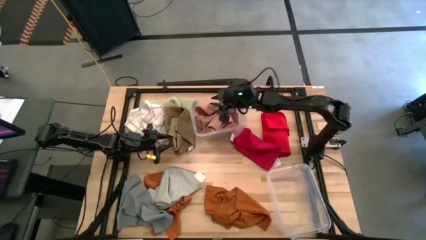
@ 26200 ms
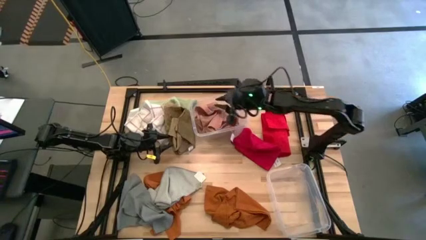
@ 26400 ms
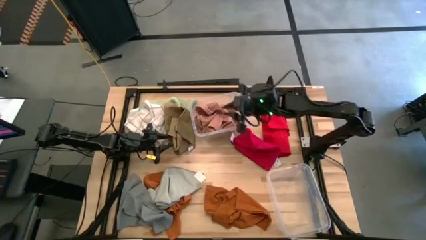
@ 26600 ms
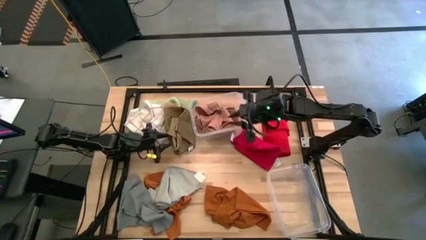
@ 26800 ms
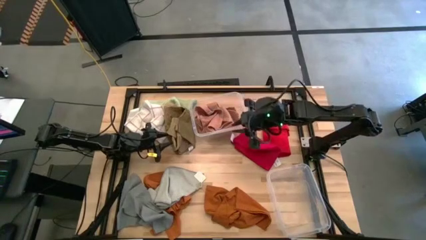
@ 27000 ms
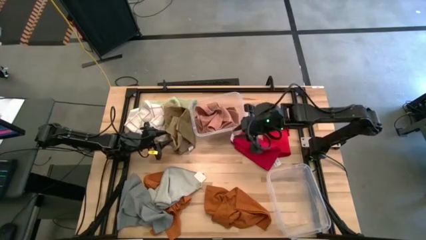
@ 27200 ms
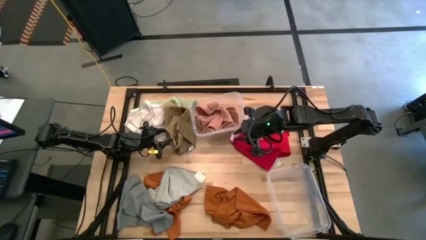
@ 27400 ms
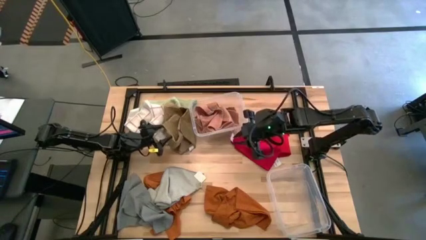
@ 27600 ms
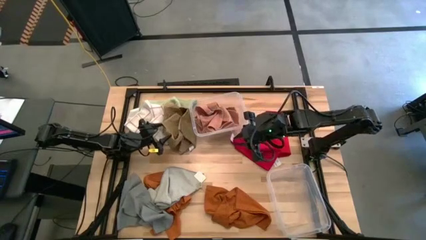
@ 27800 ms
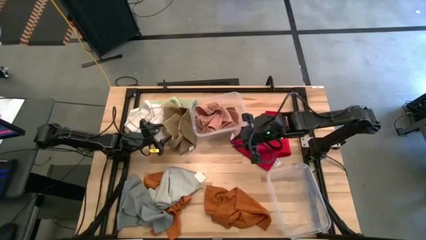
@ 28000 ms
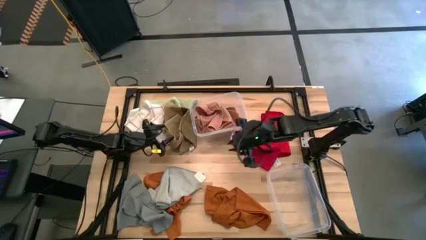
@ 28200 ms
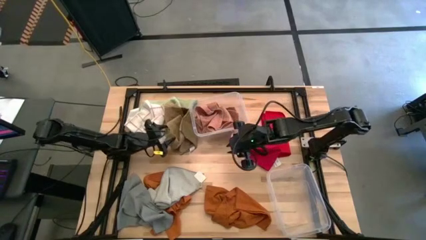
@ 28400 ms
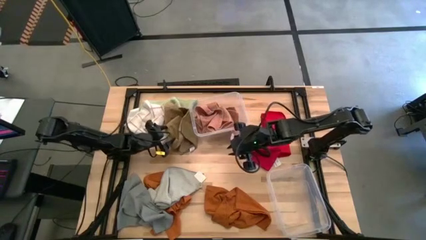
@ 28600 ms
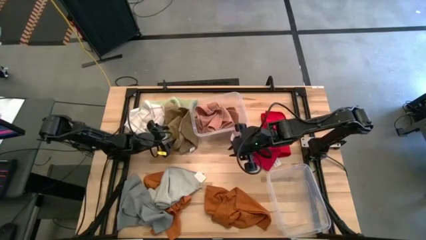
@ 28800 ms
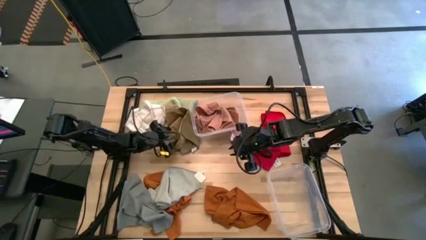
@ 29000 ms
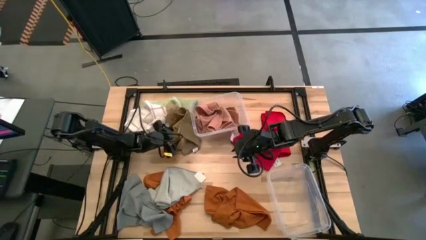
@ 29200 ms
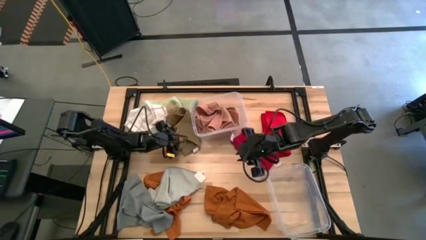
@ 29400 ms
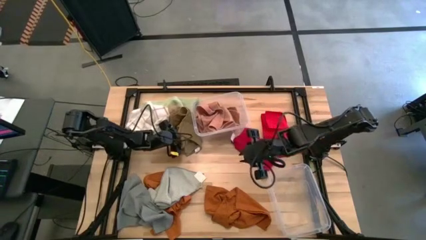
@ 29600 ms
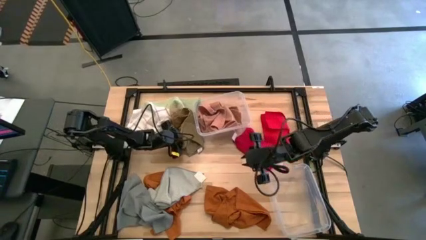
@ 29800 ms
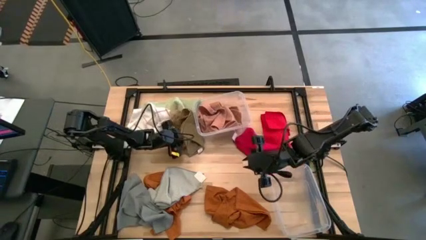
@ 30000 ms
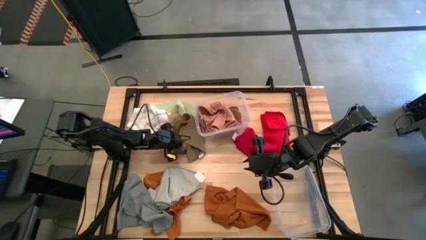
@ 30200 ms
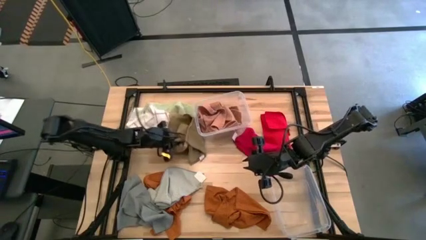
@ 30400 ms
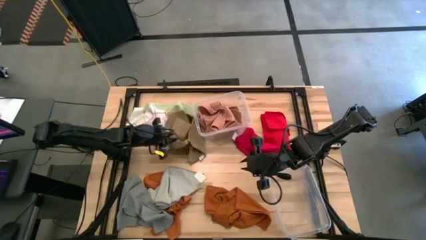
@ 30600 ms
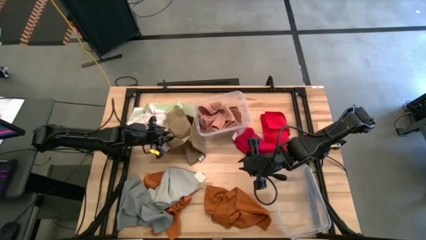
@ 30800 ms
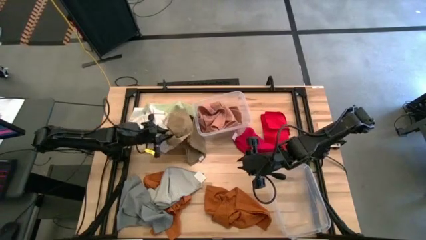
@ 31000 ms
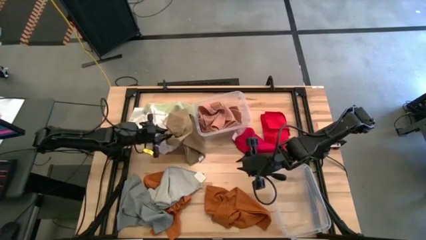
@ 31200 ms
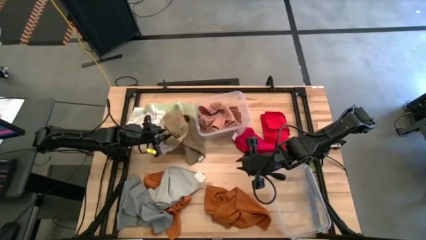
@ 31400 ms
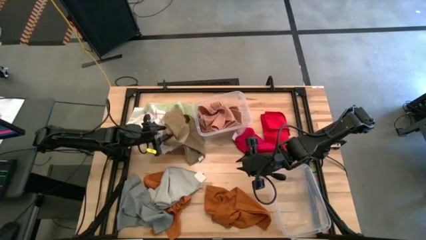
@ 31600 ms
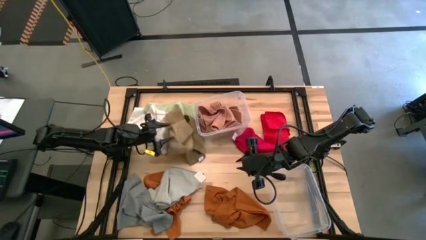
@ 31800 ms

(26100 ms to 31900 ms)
Task: Sort towels by color in basket
Put the left light brown towel into the top transparent bin

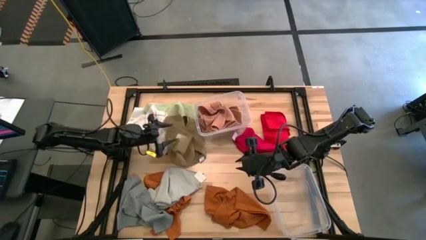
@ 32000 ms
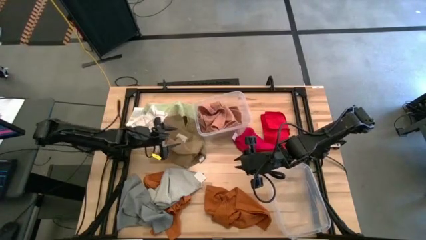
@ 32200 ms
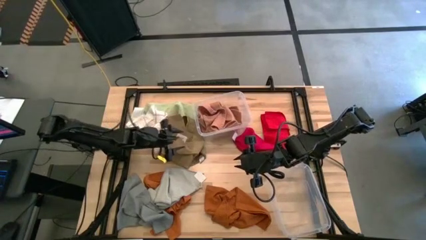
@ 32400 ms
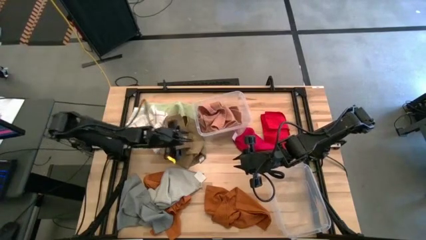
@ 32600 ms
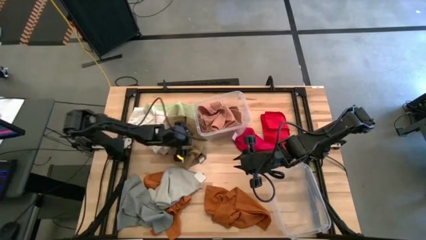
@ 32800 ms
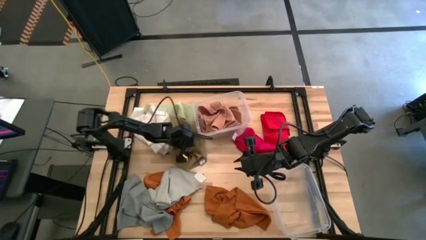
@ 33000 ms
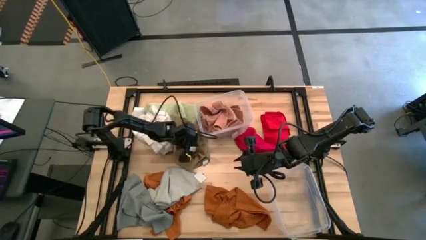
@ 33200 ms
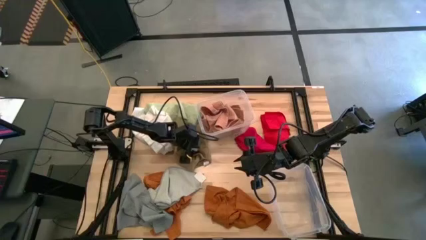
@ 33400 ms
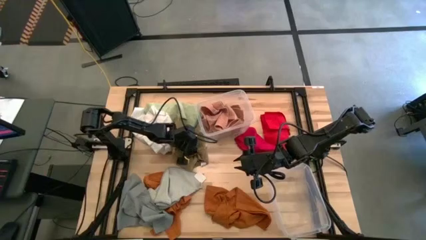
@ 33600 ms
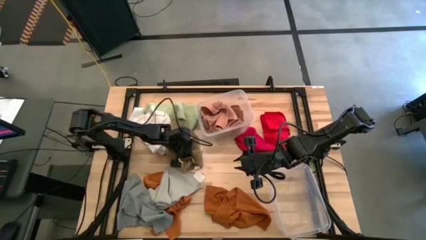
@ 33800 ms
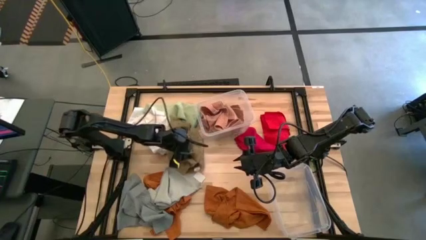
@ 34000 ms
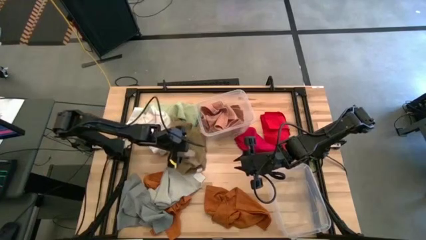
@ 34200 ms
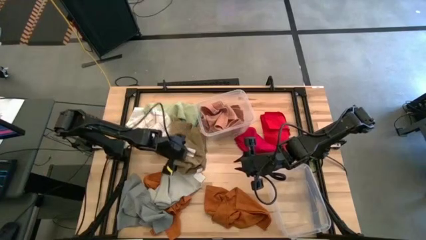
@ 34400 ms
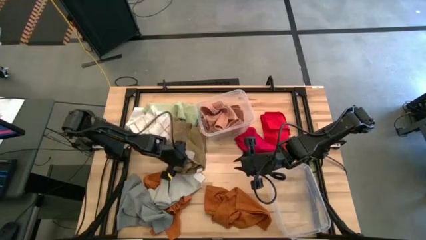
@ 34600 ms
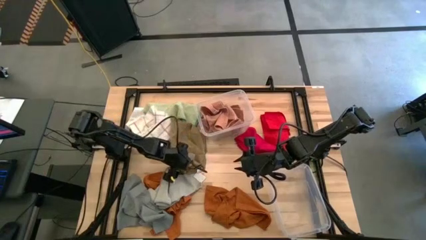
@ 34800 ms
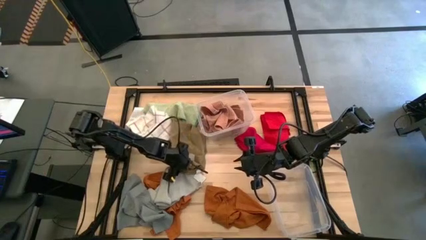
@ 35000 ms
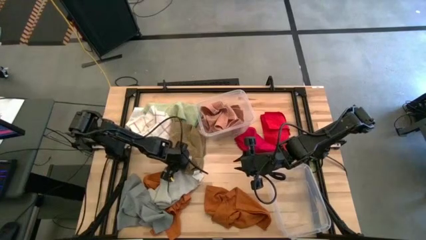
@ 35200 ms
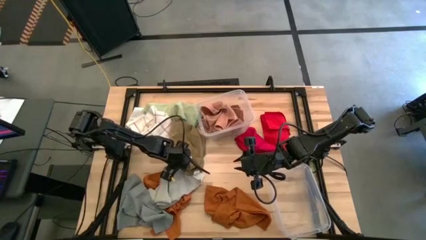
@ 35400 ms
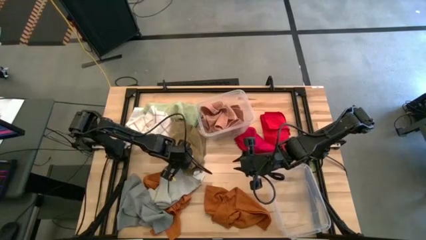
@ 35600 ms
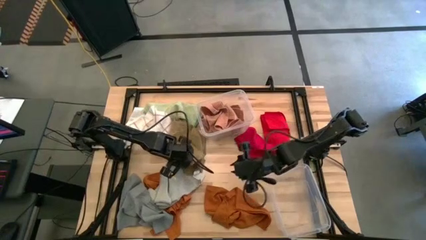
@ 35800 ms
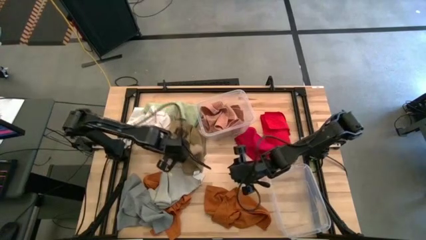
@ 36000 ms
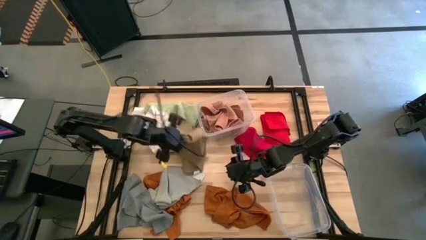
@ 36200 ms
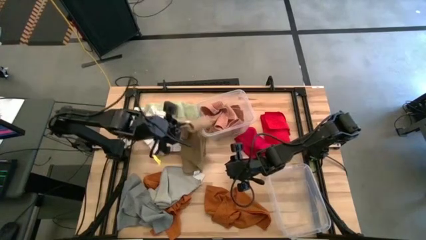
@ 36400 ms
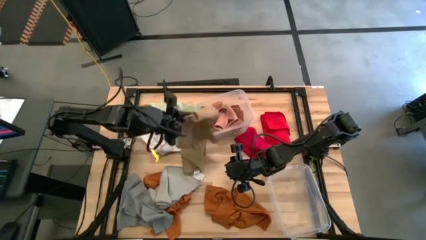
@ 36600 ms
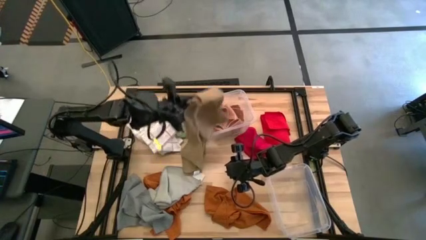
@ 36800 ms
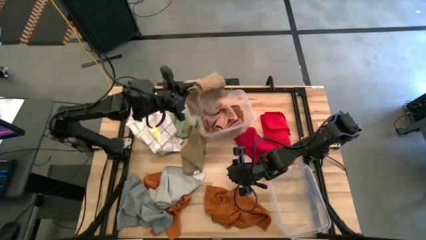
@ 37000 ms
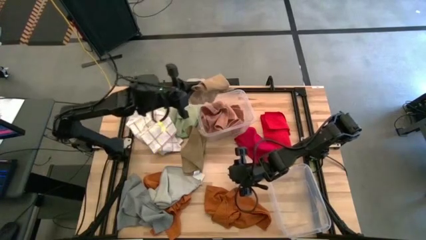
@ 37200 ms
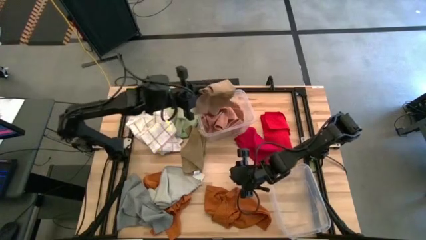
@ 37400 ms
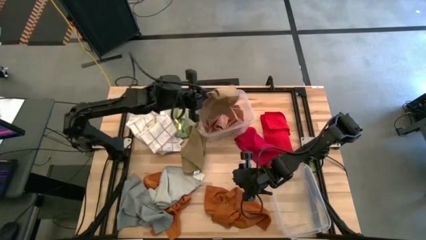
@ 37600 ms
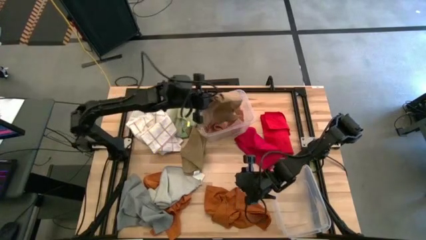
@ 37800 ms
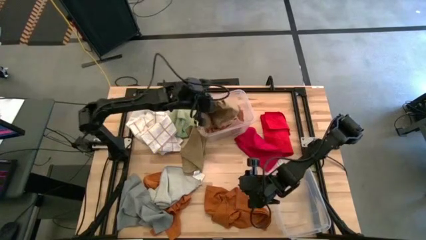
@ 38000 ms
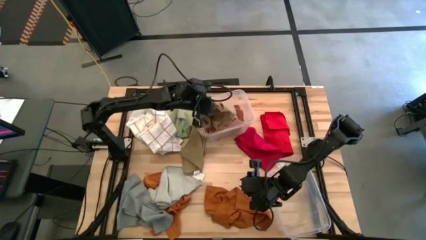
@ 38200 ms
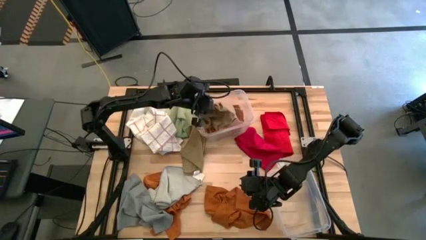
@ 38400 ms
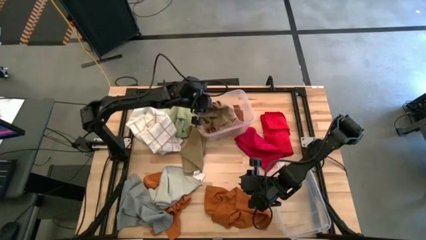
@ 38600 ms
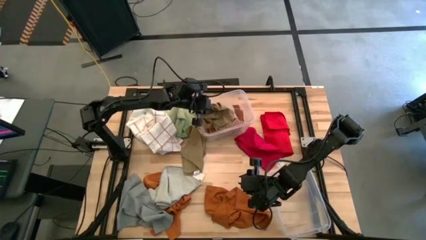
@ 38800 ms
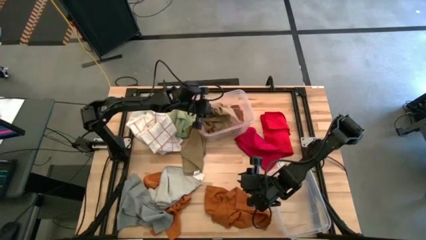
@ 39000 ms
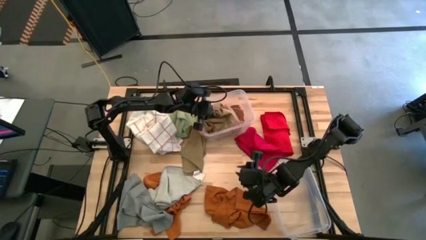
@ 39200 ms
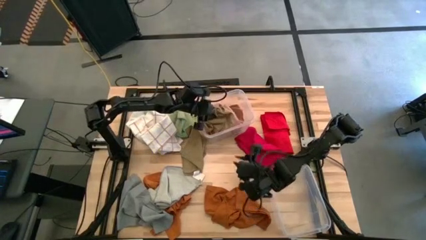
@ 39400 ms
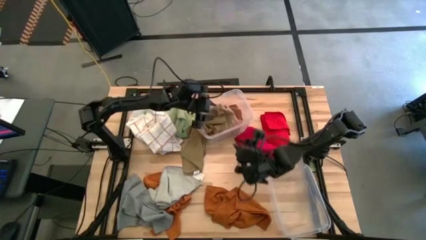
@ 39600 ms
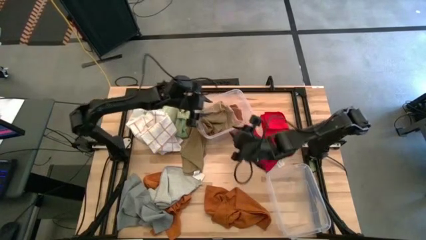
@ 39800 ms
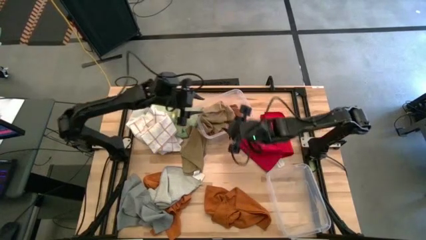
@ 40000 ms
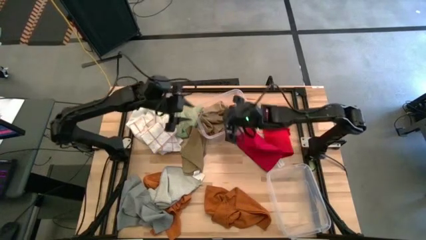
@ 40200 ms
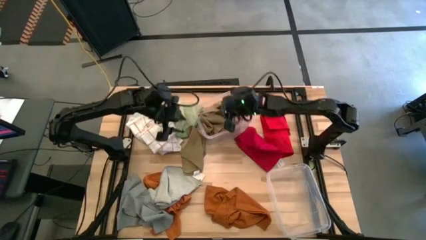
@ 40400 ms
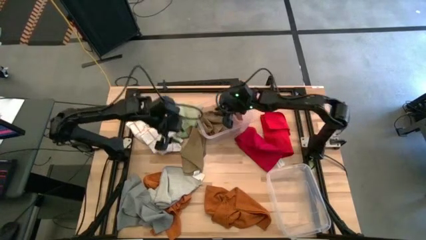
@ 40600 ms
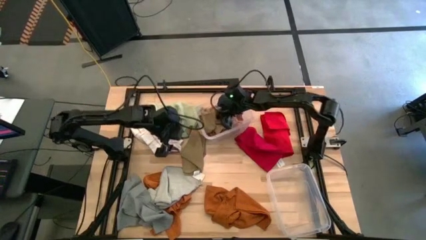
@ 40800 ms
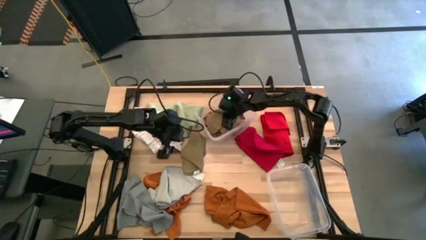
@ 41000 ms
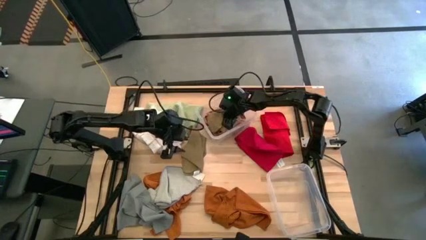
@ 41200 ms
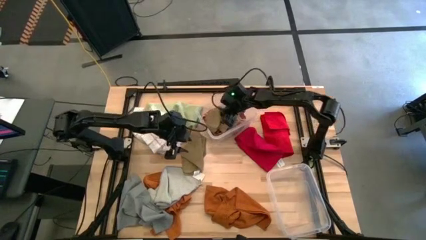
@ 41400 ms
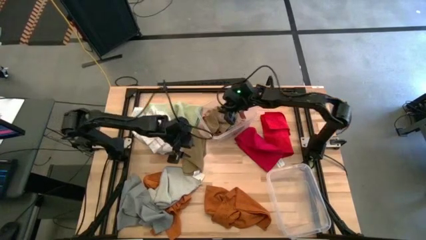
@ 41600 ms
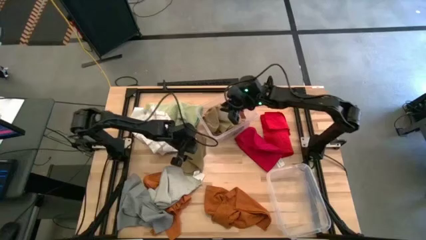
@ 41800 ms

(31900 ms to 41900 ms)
Put the left light brown towel into the top transparent bin
